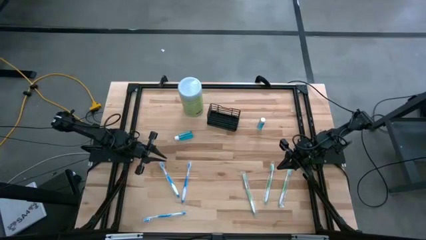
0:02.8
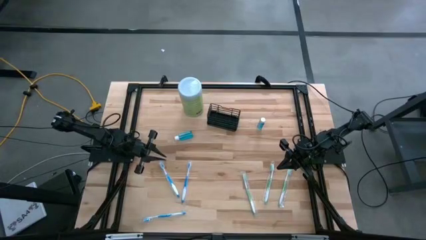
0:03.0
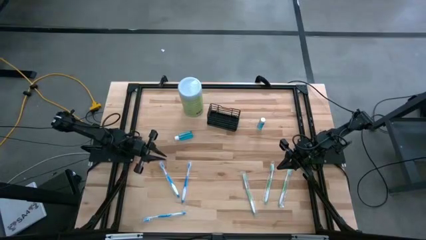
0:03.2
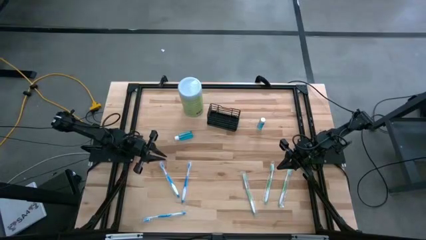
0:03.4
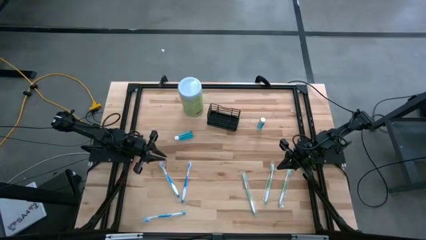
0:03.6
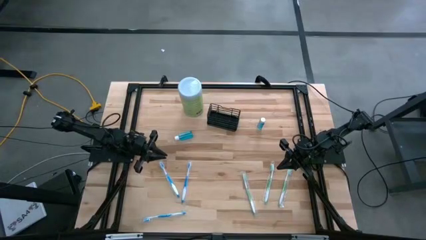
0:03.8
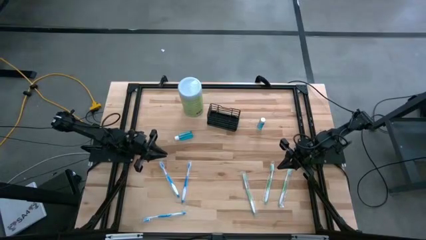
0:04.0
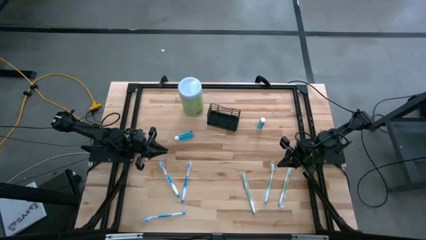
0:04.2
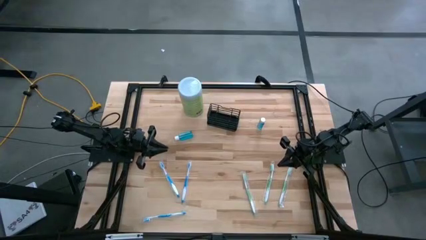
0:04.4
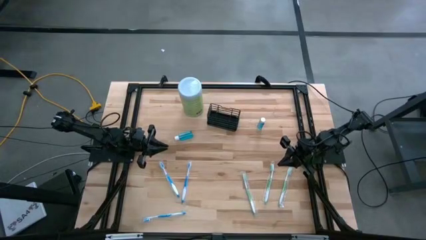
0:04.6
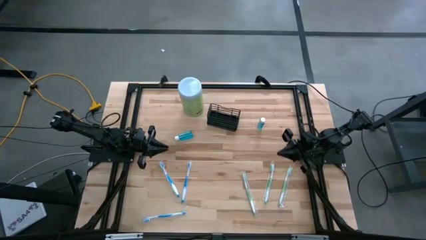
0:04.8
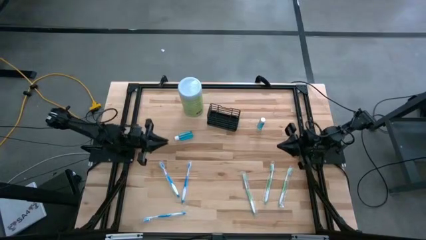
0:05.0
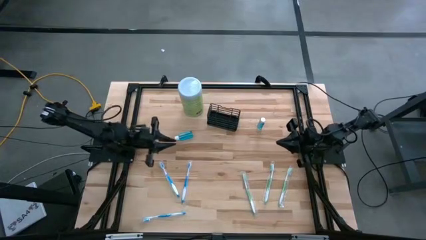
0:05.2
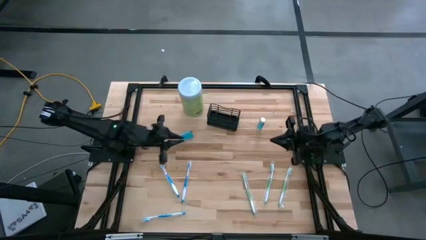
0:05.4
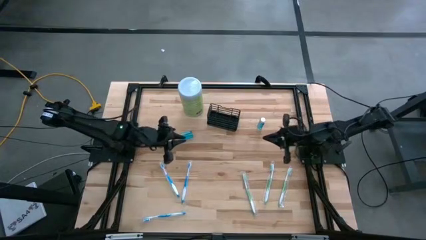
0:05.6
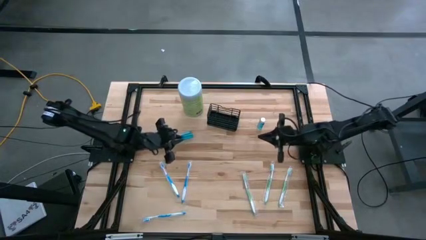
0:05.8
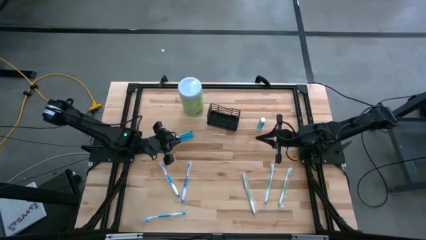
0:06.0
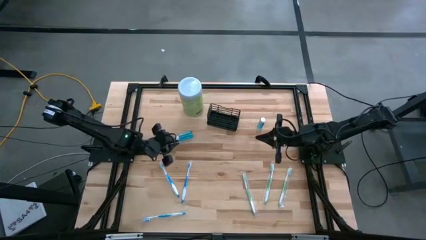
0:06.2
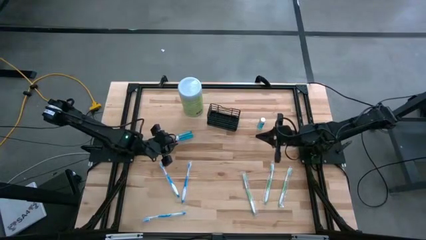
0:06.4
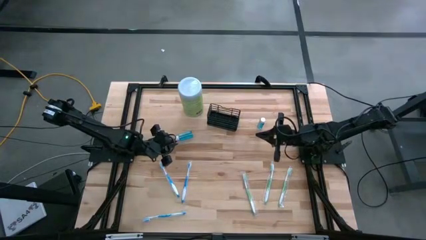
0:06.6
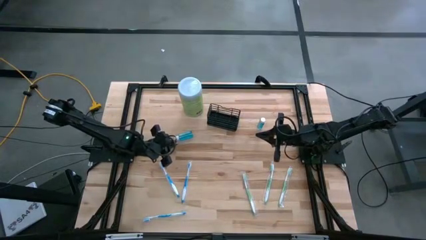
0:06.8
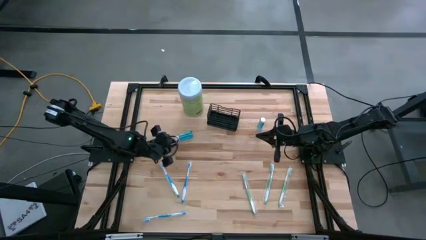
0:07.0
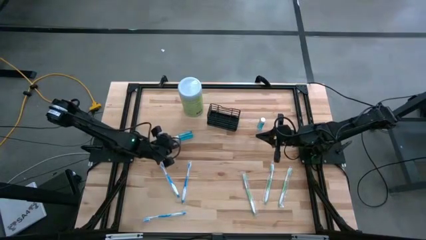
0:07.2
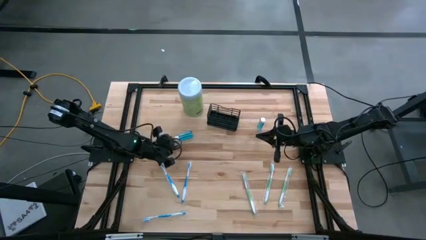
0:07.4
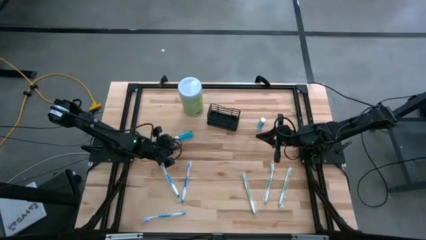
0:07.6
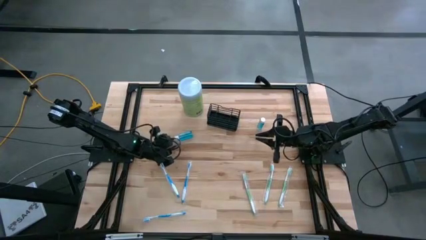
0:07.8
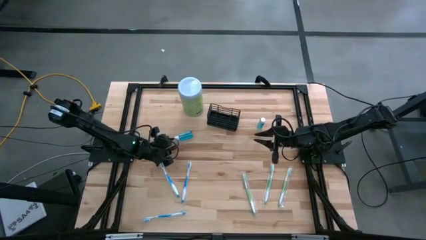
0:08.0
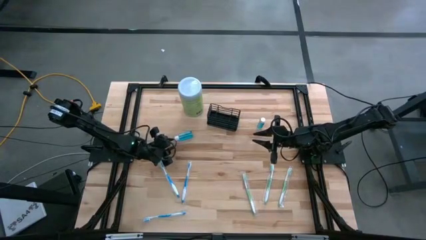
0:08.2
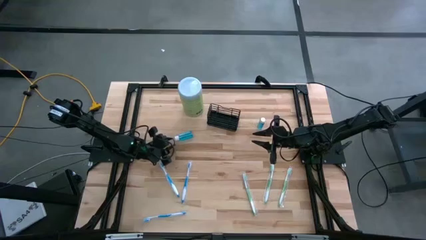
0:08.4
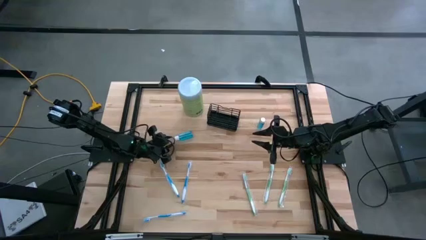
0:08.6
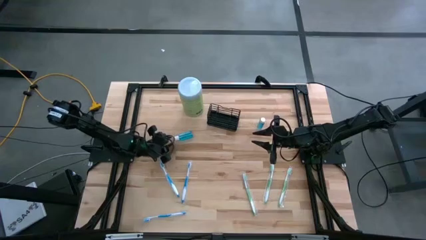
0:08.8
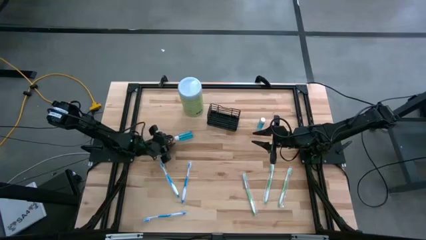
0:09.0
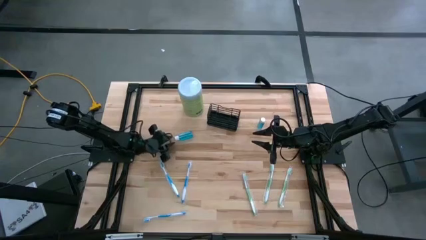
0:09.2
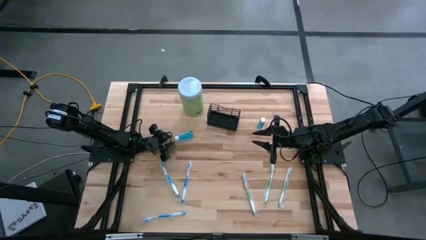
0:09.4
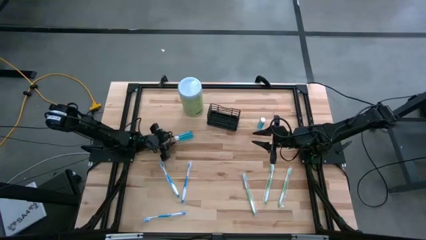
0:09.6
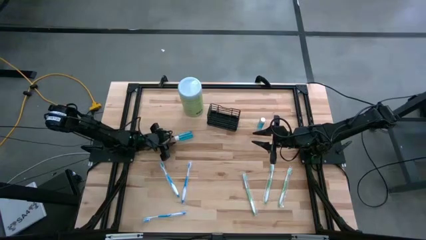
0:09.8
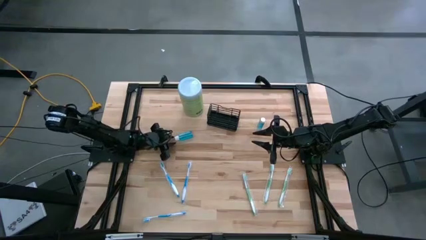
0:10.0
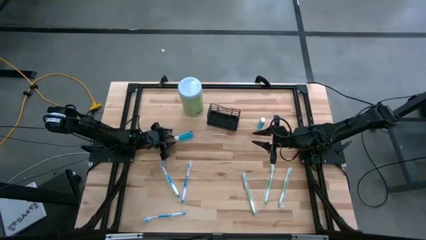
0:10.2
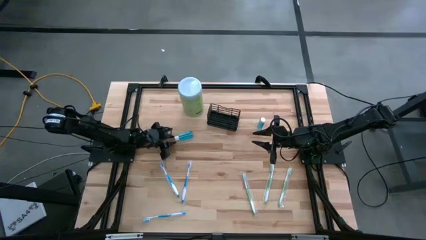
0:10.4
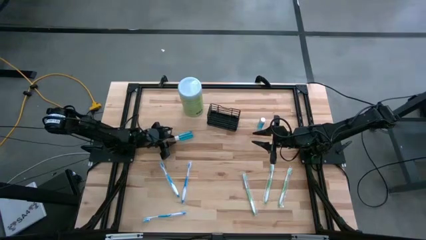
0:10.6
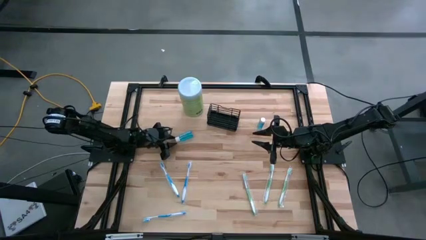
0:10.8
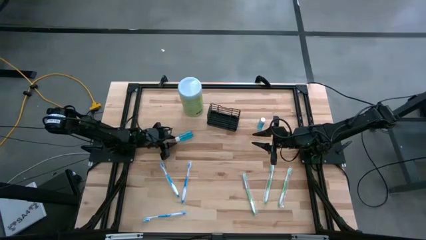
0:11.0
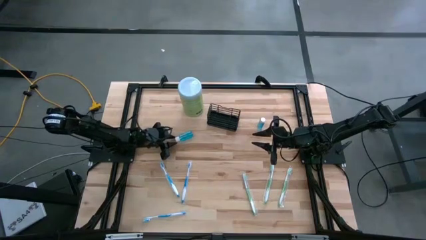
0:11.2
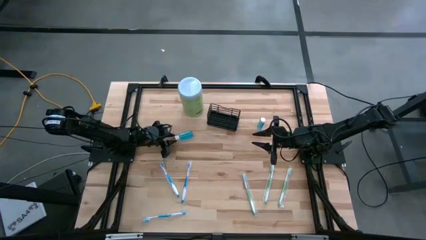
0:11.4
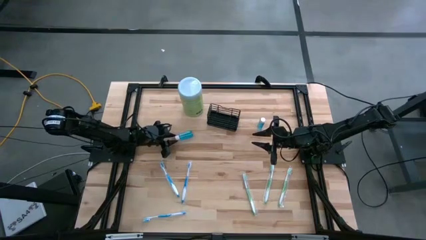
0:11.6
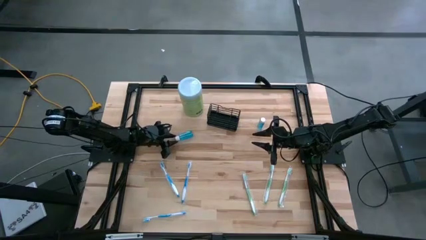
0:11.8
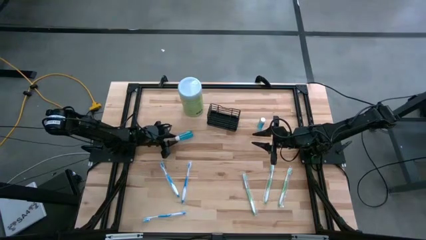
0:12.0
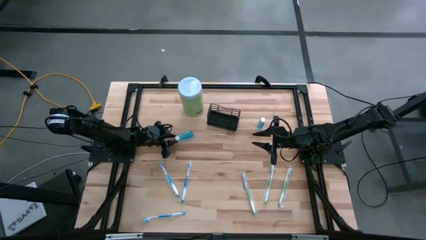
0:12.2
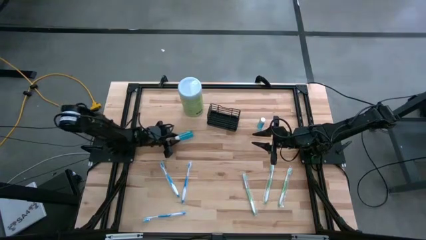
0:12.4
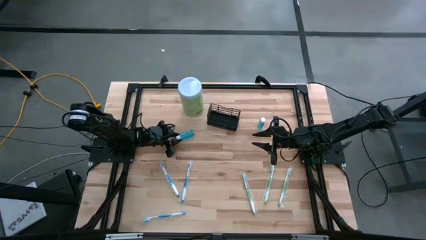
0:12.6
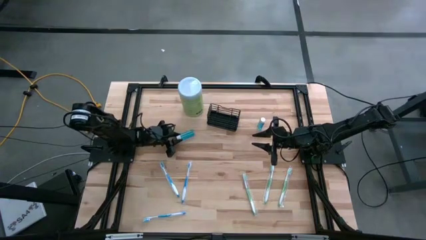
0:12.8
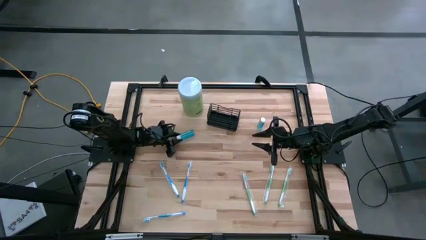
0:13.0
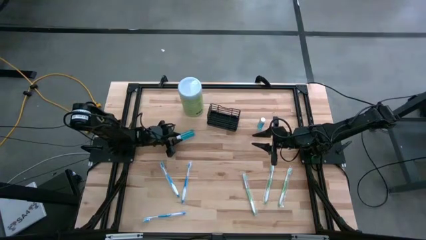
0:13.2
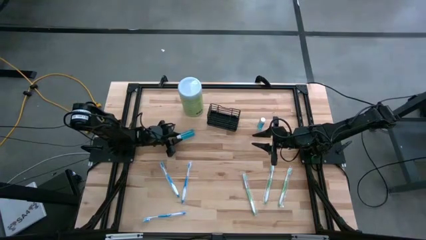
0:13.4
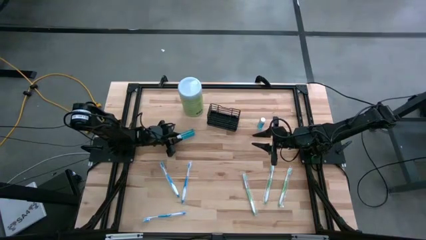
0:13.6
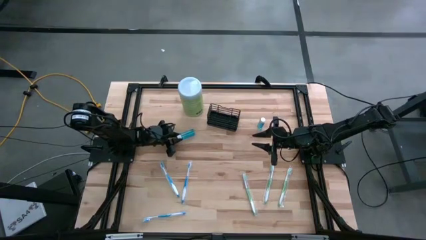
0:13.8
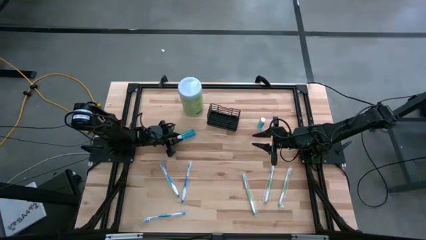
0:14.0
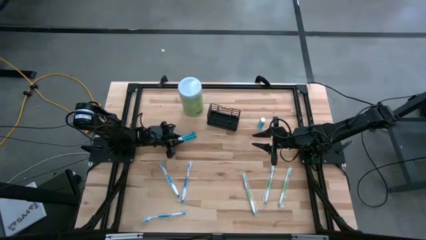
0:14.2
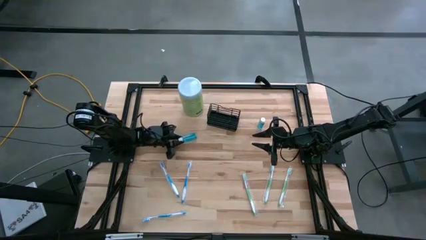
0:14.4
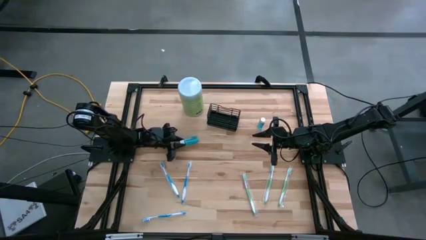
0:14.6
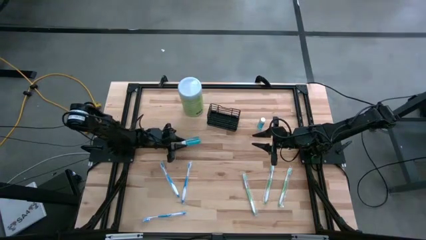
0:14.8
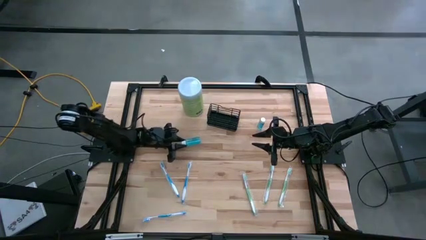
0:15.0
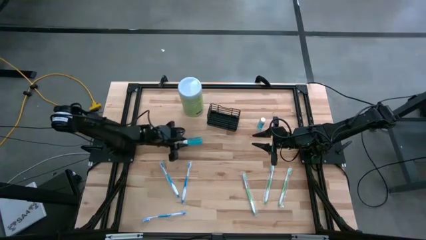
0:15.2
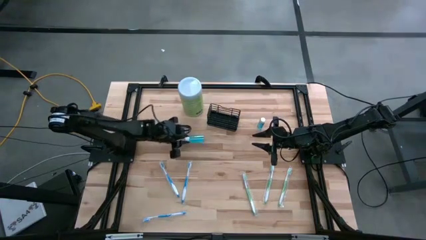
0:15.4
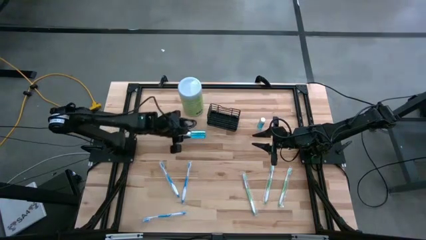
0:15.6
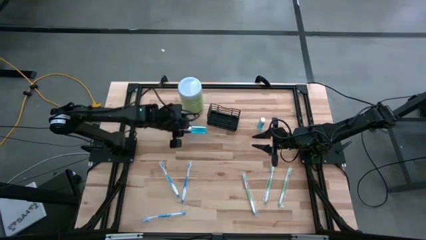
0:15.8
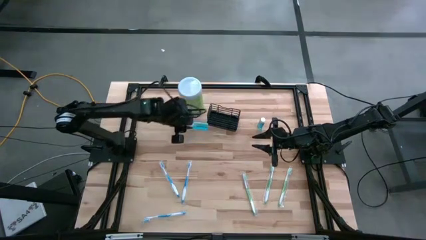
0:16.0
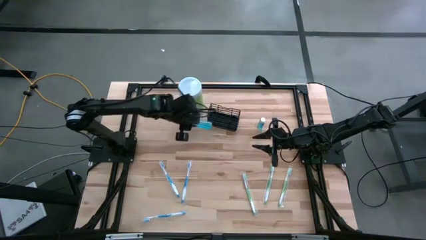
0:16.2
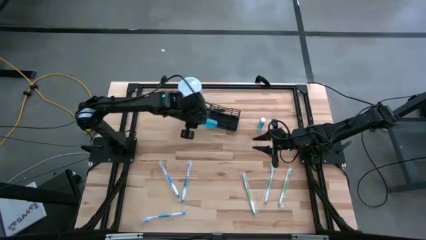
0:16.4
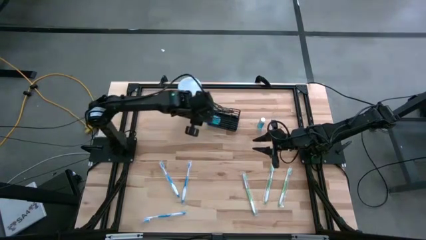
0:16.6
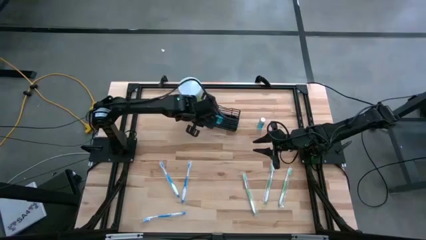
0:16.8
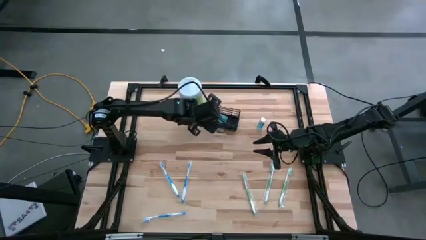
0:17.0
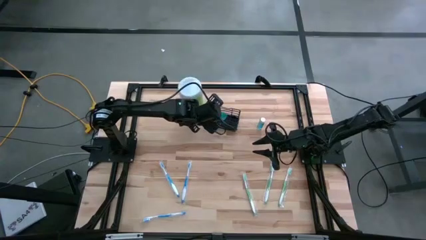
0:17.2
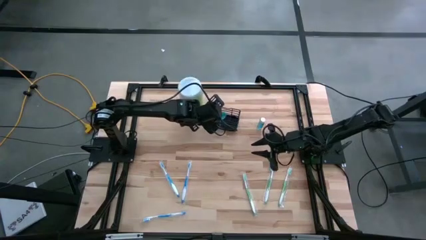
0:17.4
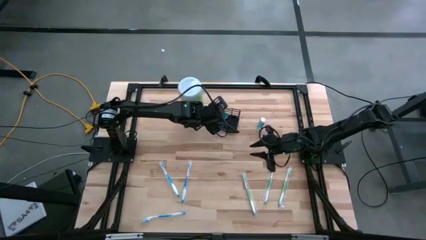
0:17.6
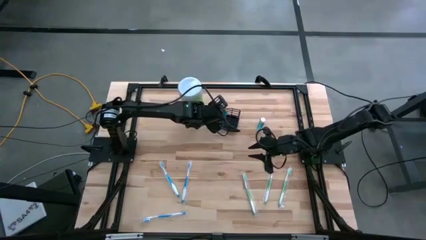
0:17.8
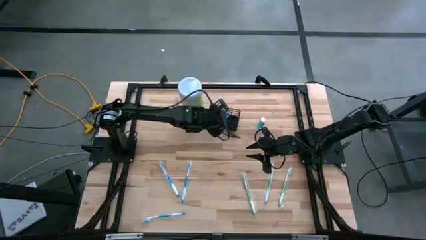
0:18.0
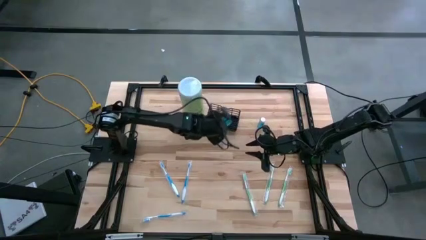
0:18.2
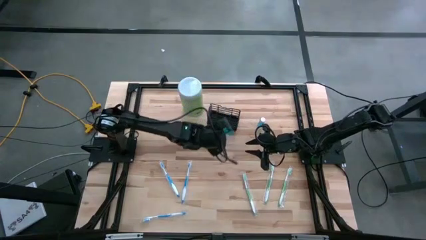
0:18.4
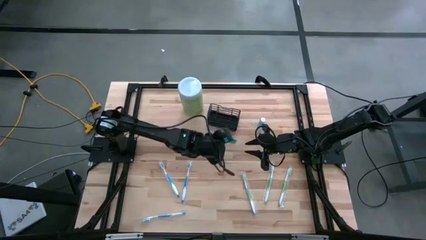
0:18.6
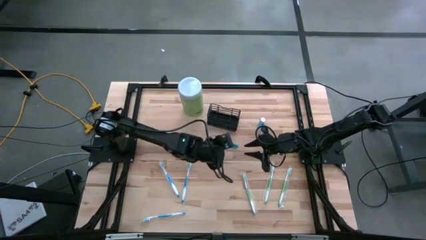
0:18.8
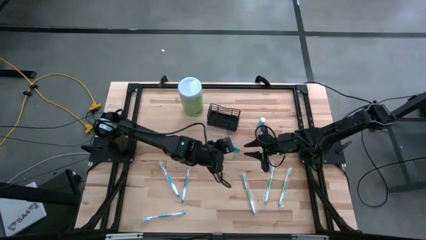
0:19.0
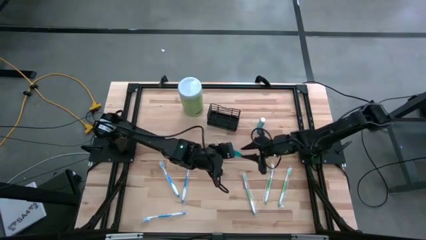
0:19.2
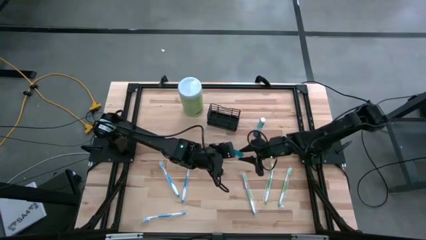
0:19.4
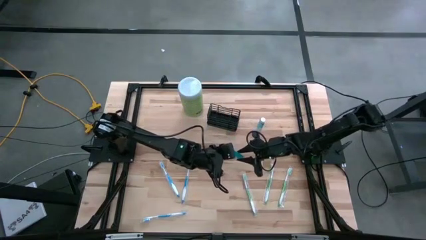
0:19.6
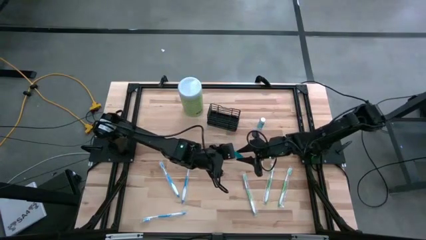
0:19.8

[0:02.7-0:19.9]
Task: Pick & Place toothbrushing station
Put the left mouthwash into the mesh organizer
